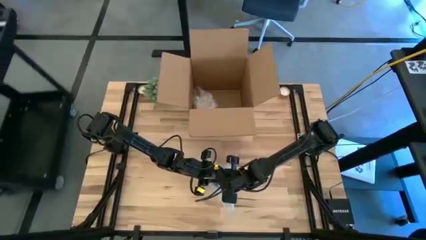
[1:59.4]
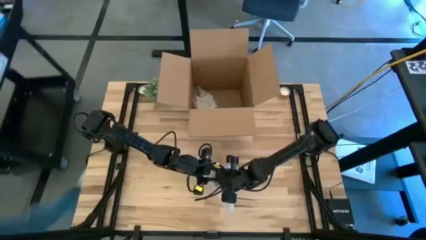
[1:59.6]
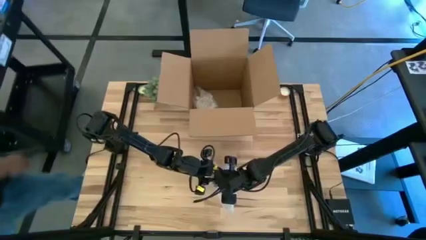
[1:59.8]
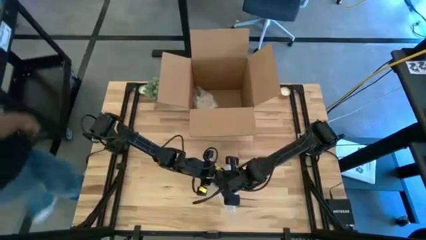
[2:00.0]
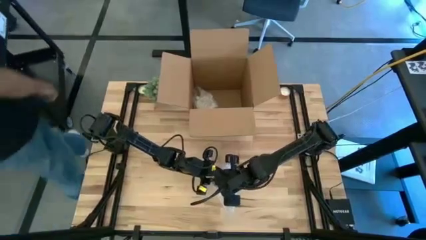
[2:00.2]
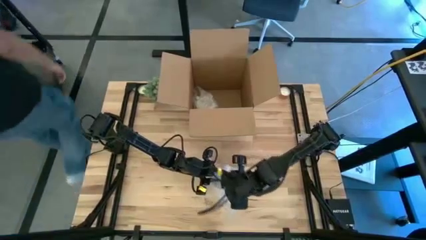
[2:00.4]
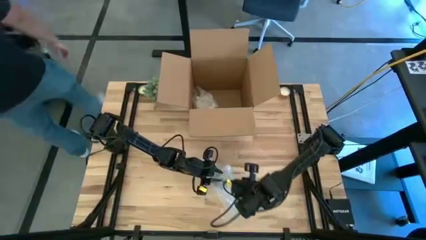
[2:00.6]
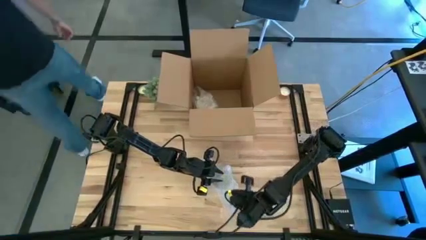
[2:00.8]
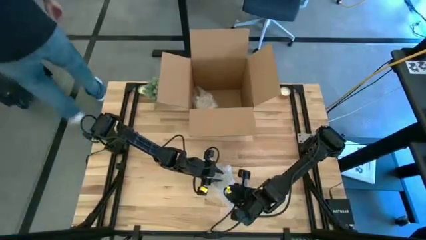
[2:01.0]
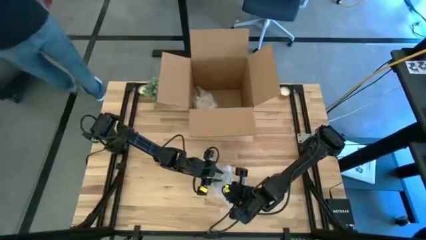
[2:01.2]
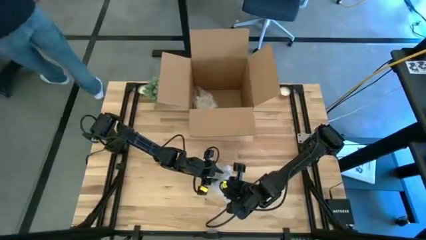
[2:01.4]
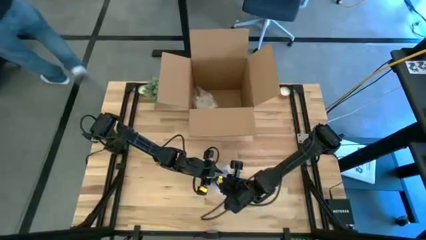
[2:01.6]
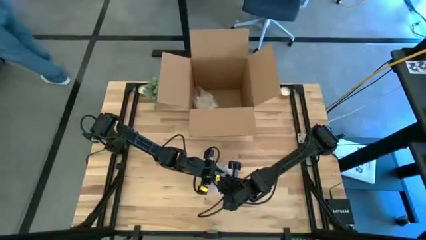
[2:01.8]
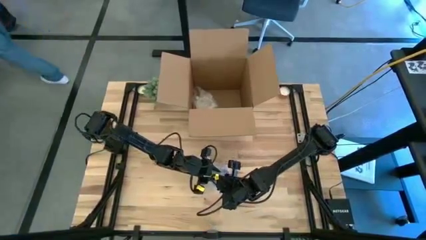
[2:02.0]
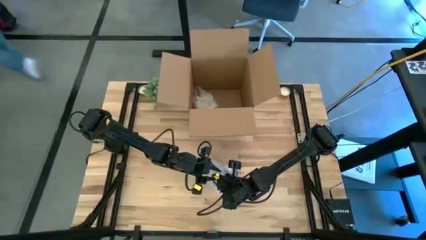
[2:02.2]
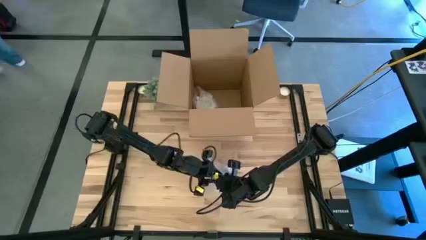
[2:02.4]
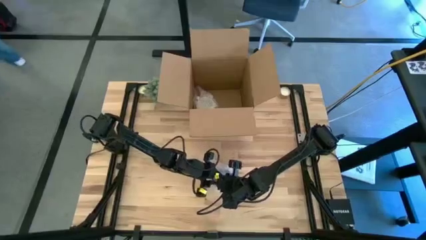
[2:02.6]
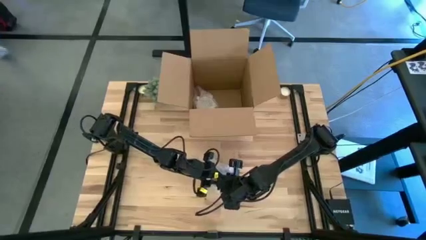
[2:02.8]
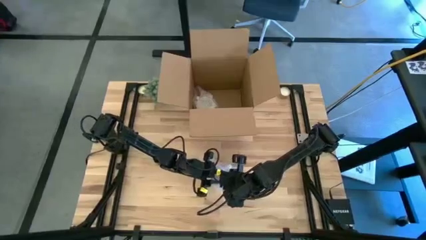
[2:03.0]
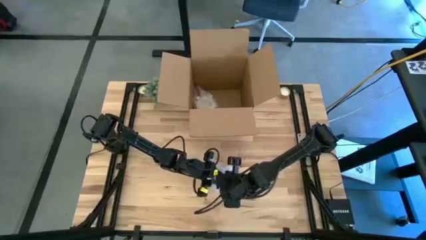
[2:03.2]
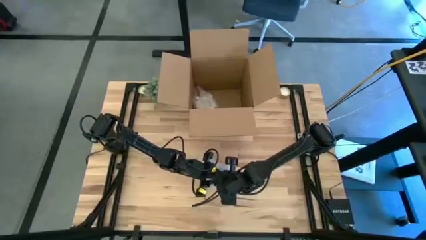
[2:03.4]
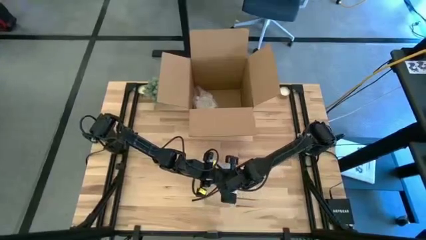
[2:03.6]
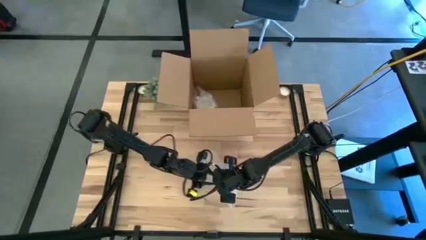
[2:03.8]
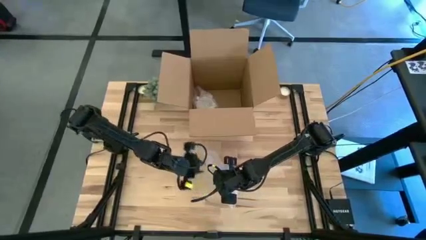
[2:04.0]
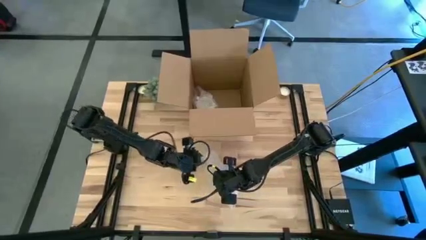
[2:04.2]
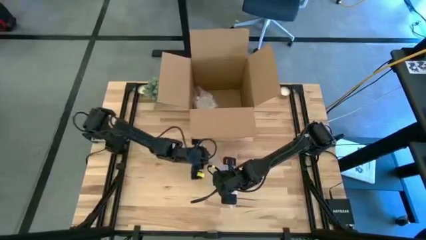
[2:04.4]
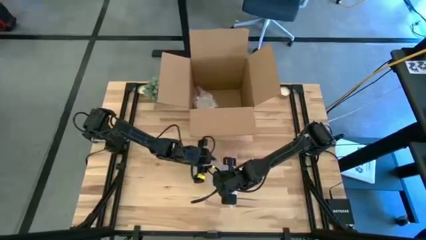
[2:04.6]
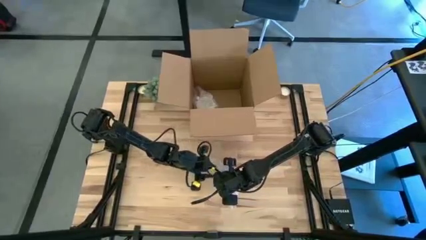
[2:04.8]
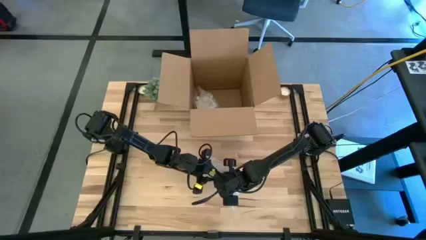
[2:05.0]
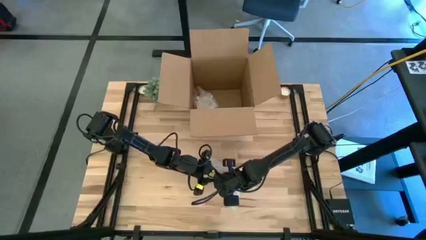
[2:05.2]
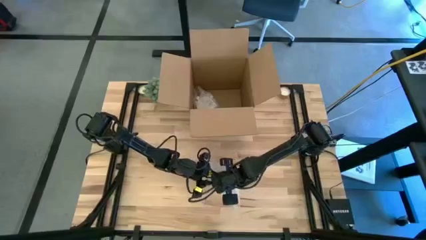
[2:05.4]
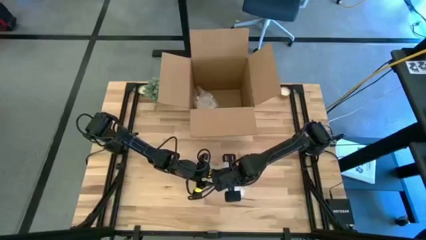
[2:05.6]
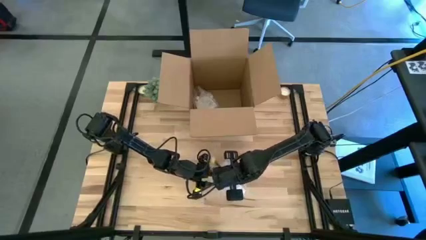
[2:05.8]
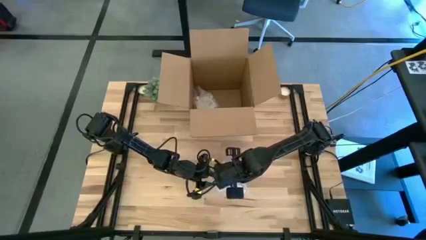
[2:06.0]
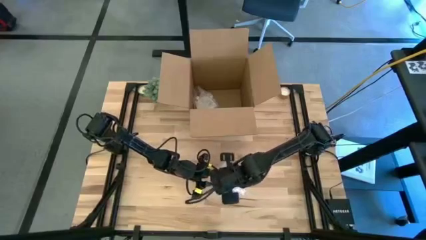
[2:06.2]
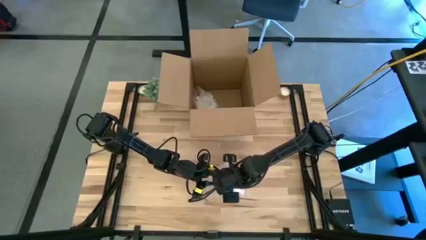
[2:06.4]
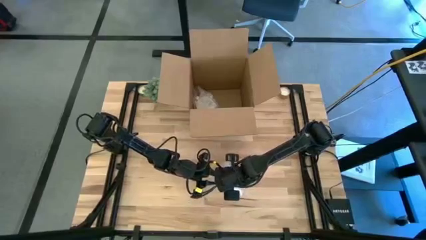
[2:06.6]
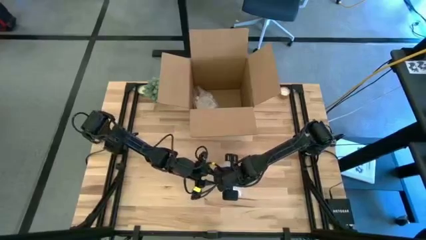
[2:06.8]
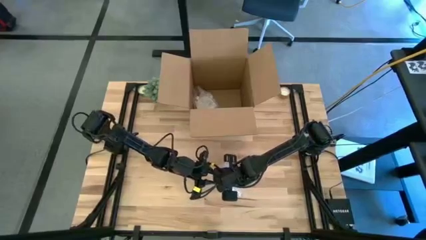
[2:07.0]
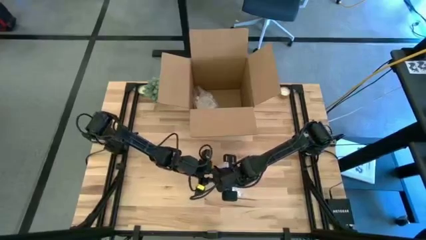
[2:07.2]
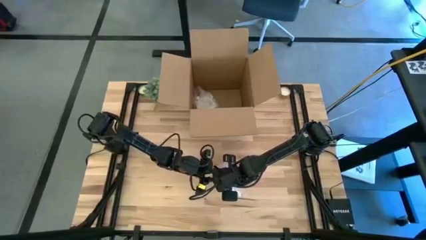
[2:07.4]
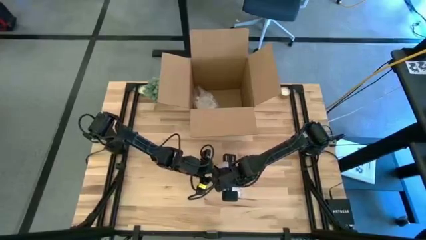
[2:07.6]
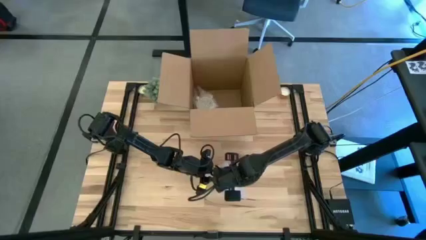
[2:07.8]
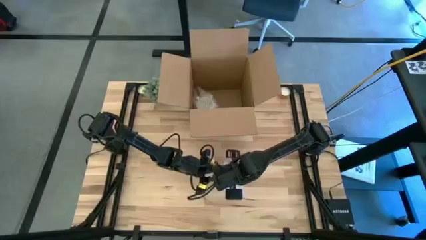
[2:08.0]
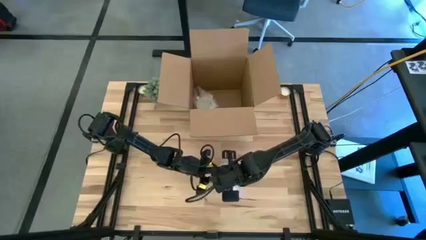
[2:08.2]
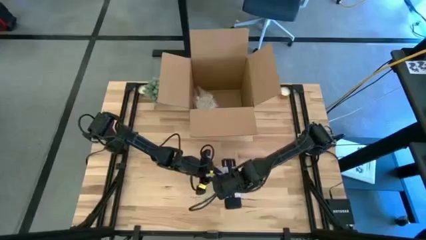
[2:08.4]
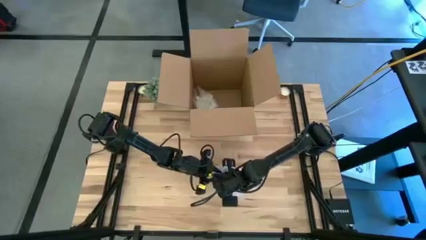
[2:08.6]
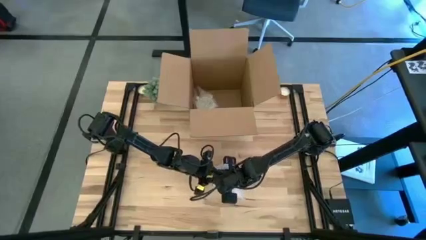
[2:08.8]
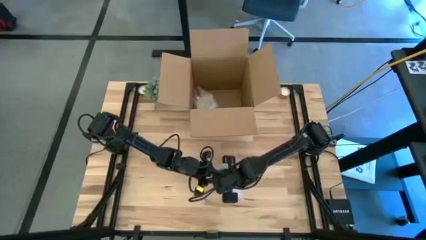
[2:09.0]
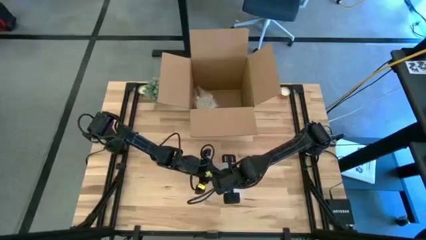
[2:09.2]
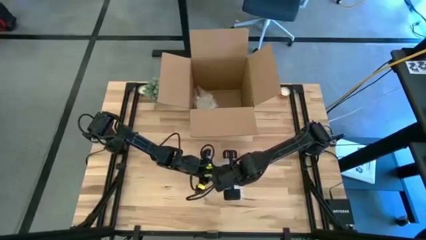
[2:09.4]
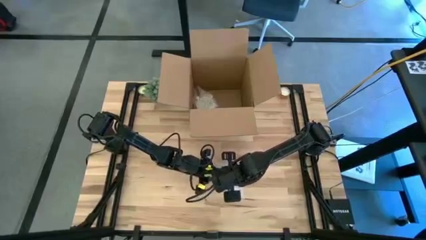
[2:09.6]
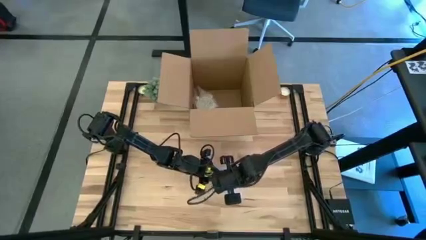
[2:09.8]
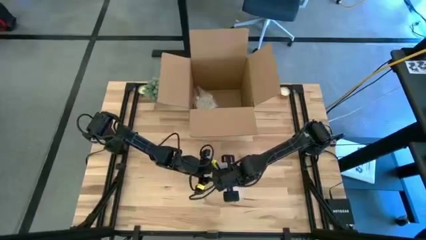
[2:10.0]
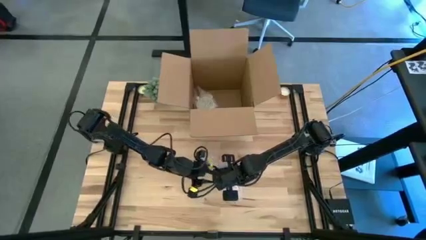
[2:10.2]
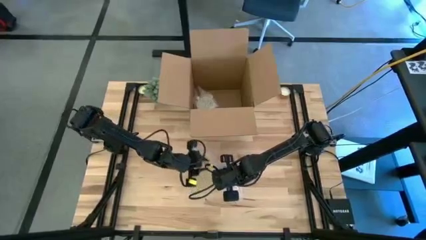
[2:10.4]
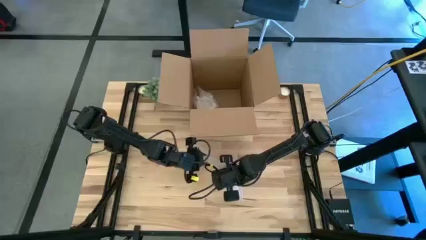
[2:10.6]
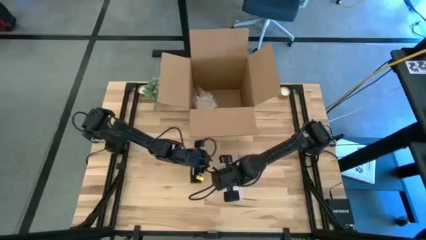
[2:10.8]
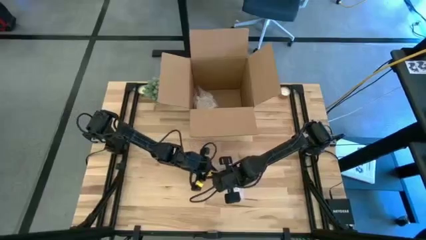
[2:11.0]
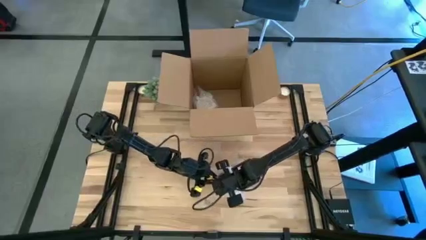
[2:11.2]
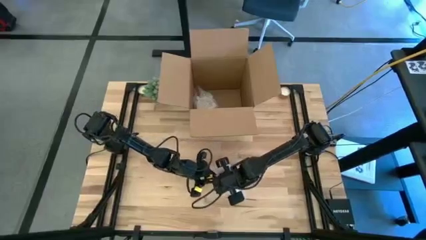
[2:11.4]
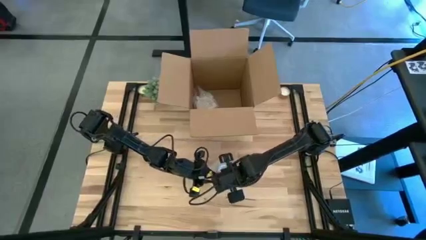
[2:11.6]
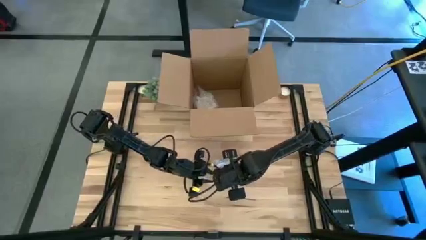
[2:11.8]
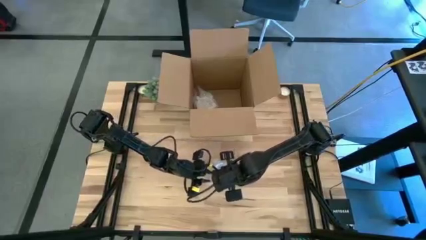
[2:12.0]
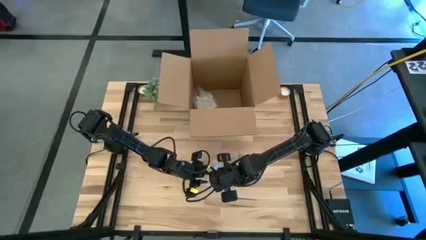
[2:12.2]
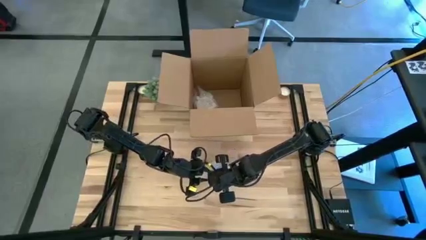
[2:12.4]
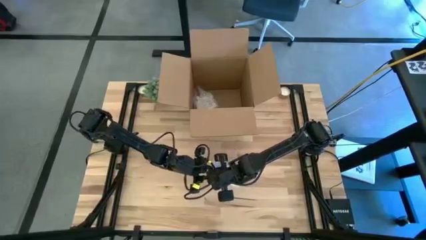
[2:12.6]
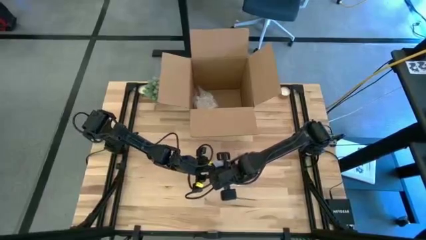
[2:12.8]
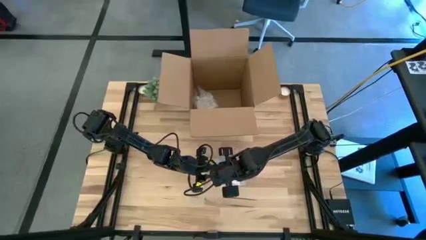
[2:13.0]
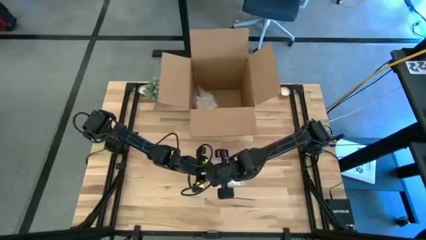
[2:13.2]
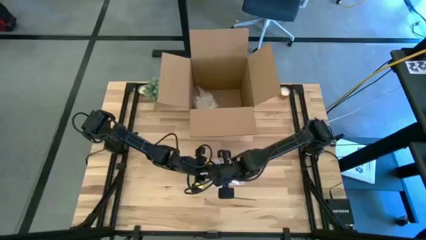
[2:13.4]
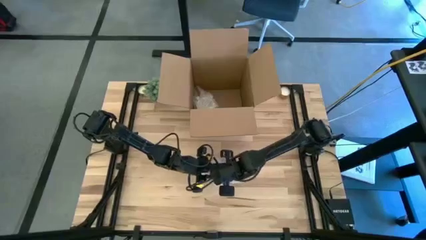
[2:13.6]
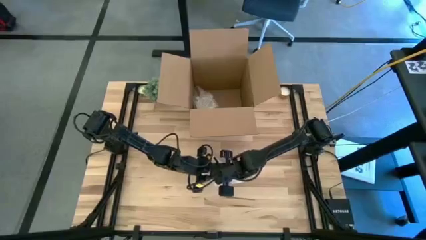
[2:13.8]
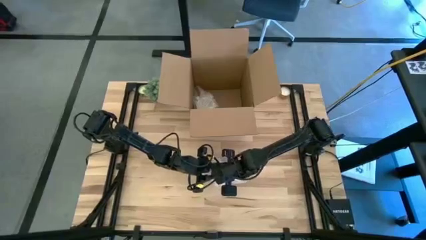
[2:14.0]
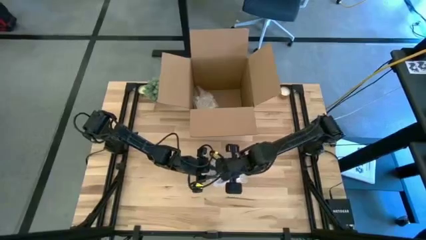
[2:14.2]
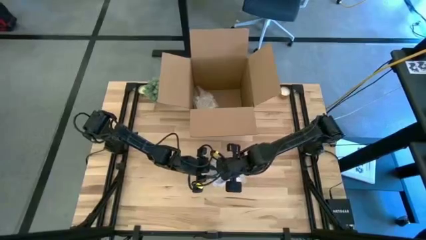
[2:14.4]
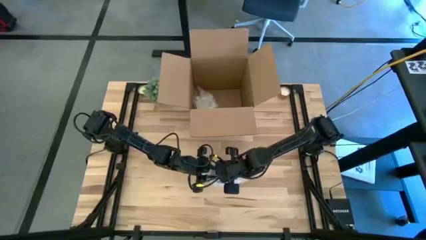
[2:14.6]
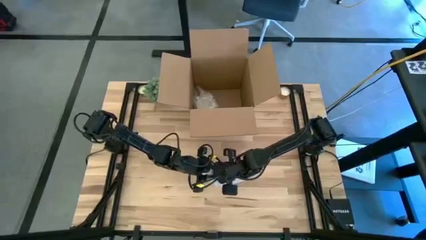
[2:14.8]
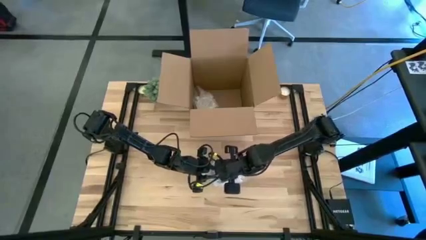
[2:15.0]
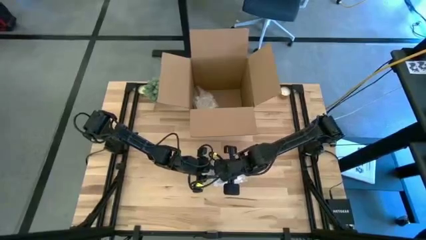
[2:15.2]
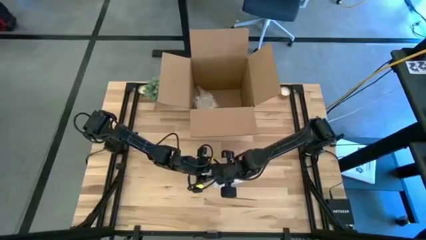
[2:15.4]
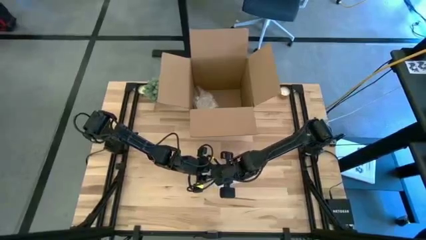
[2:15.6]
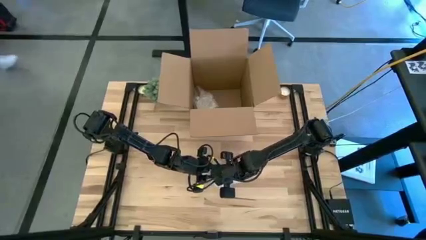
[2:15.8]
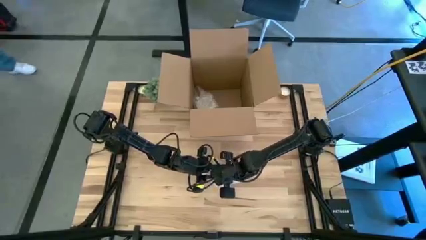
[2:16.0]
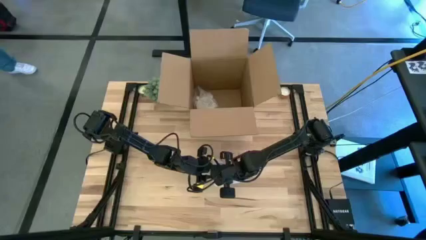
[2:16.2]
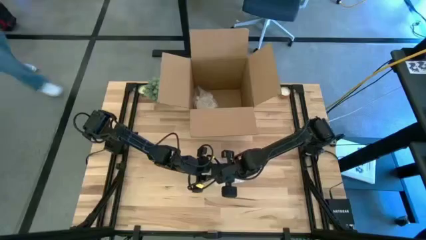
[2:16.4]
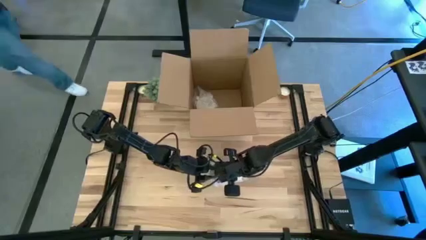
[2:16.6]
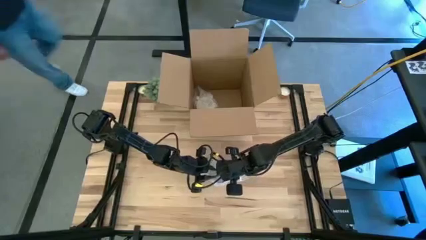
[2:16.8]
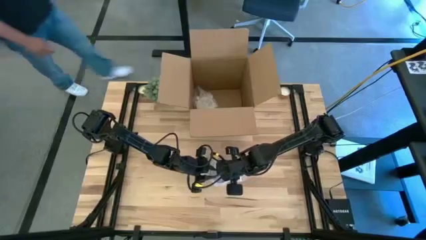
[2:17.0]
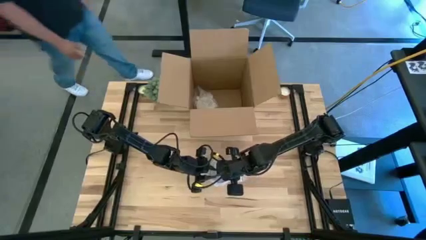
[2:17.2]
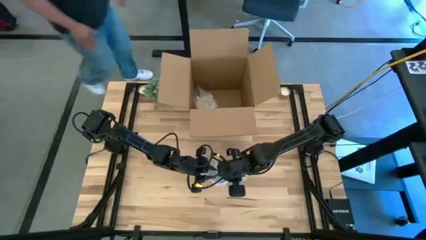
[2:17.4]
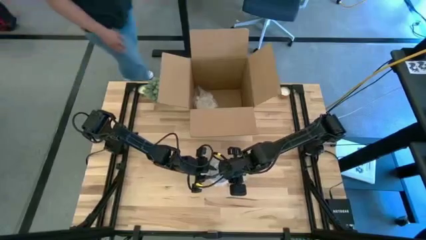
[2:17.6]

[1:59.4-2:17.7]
Task: wrap mug
Wrap the red mug with the bubble wrap
